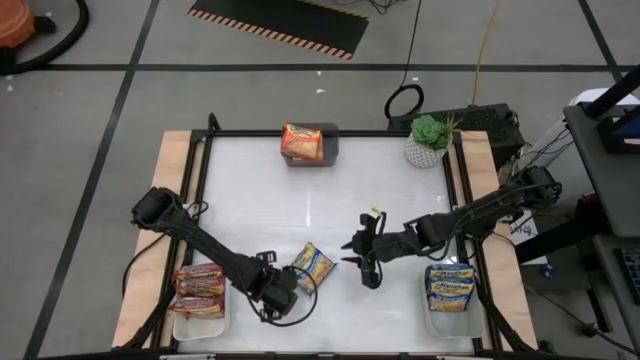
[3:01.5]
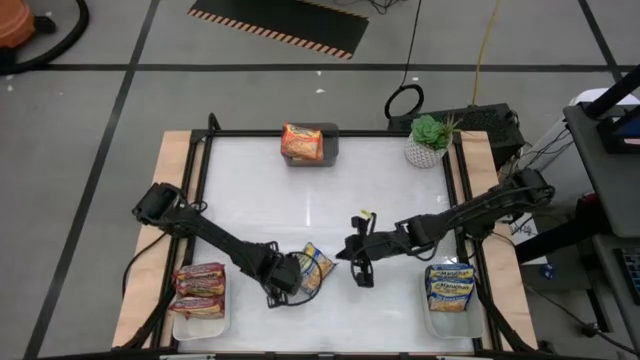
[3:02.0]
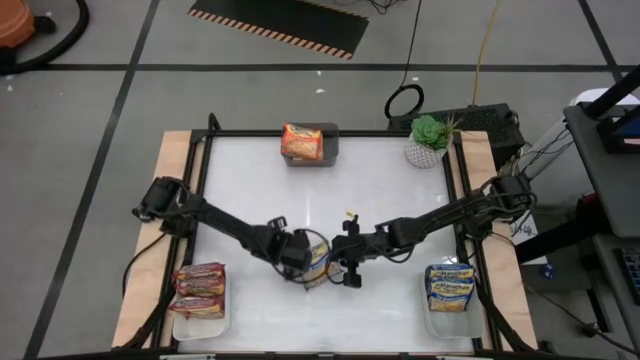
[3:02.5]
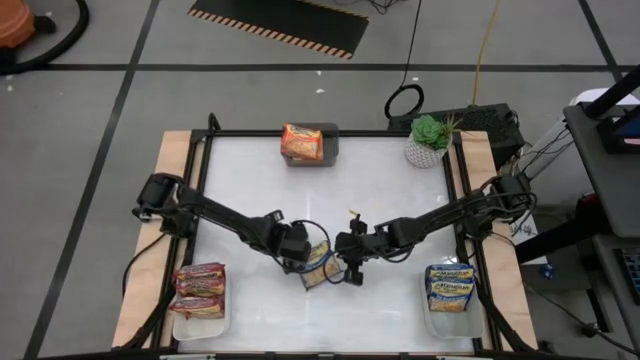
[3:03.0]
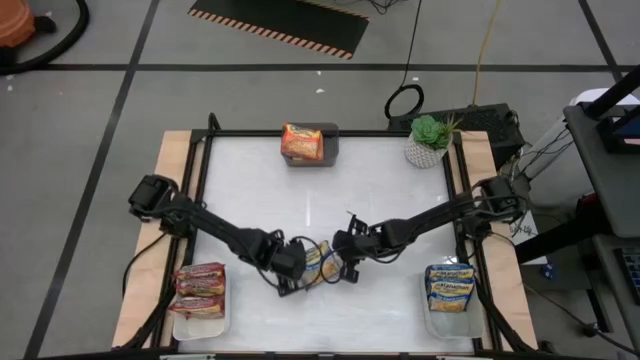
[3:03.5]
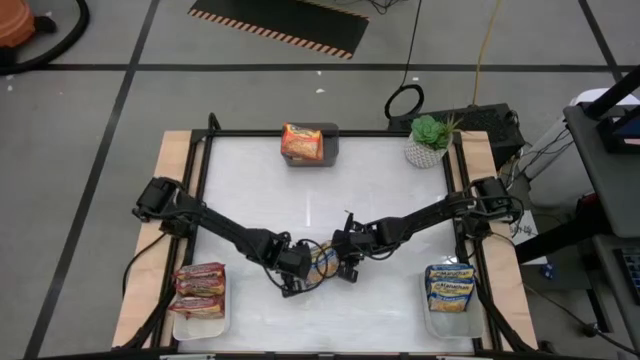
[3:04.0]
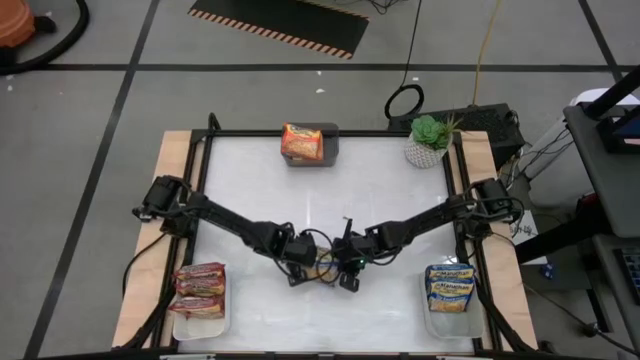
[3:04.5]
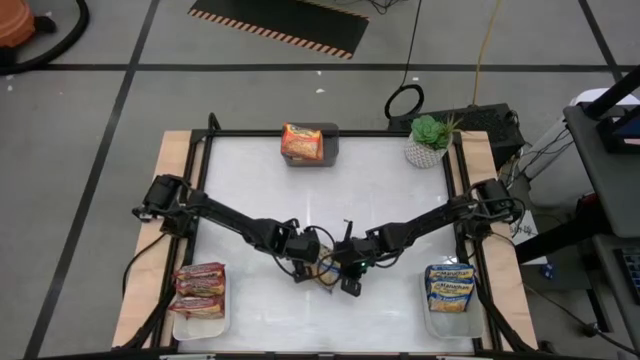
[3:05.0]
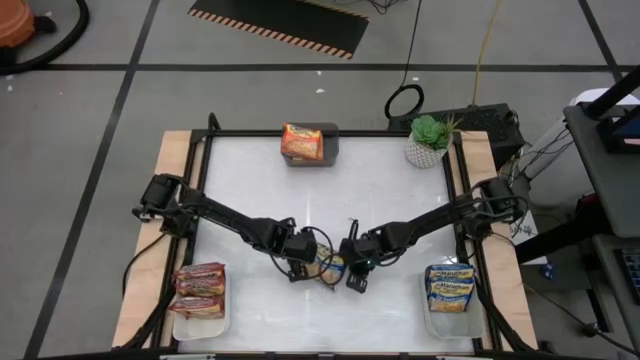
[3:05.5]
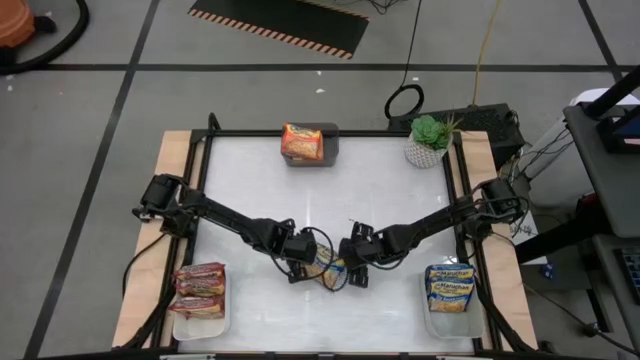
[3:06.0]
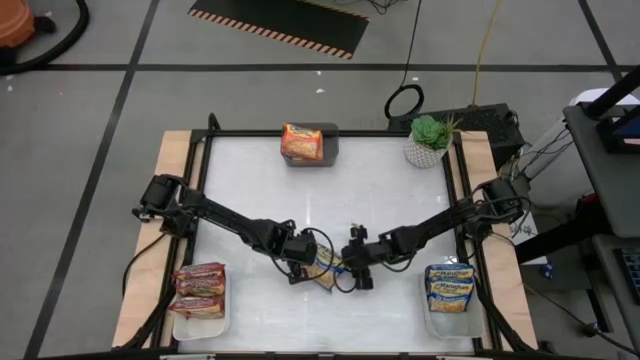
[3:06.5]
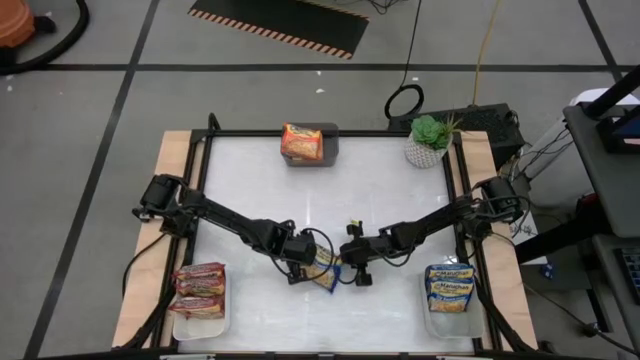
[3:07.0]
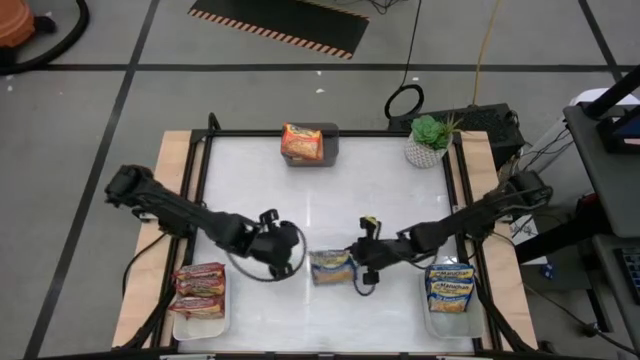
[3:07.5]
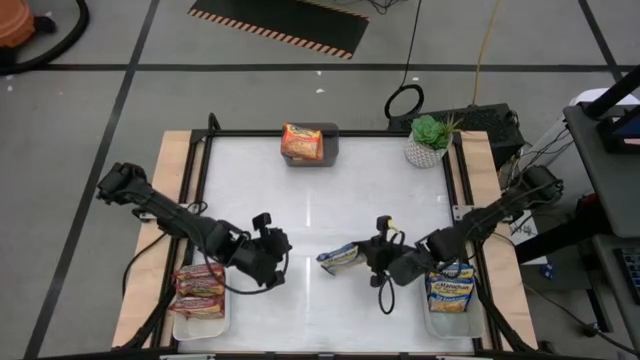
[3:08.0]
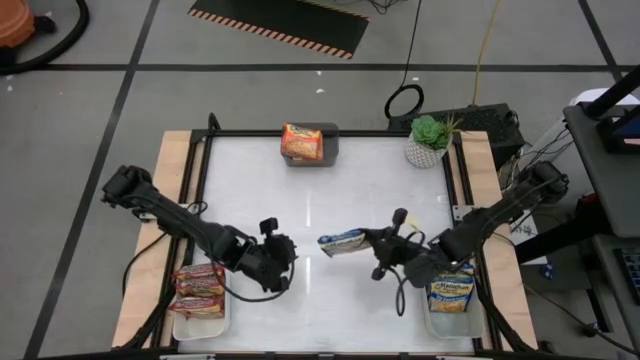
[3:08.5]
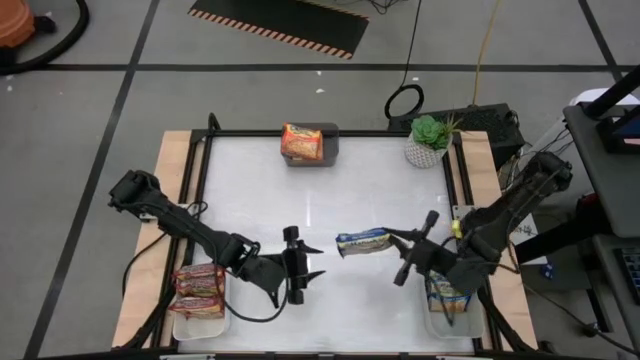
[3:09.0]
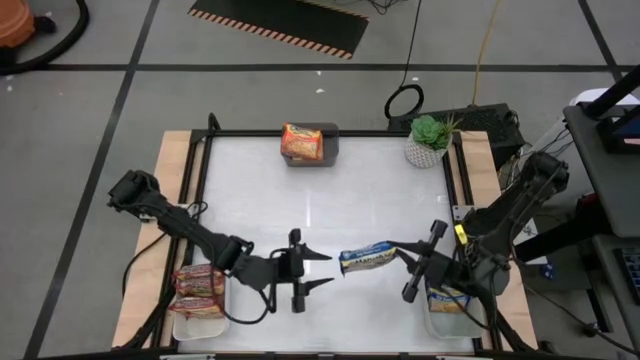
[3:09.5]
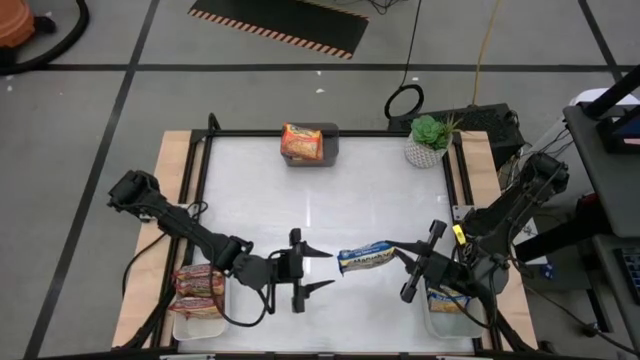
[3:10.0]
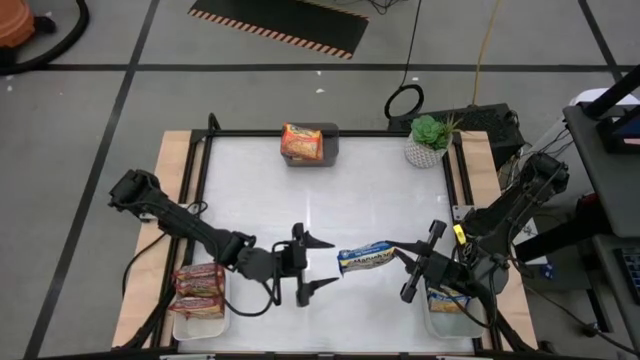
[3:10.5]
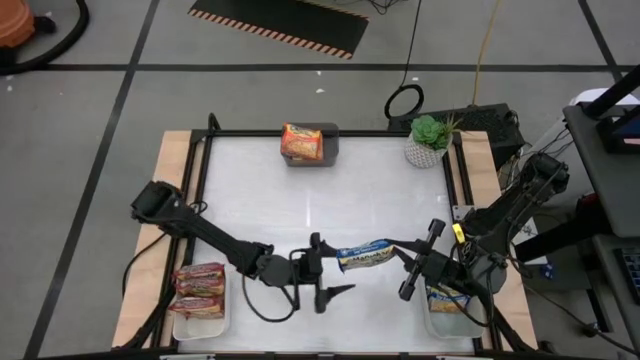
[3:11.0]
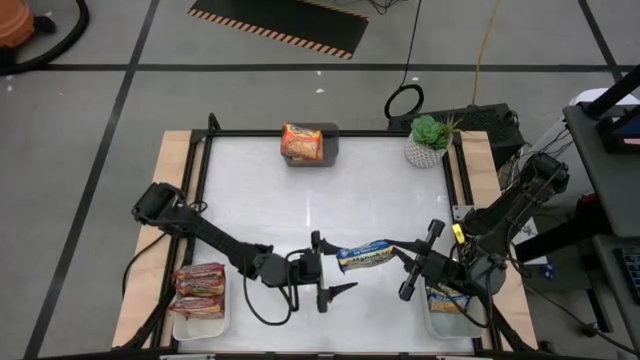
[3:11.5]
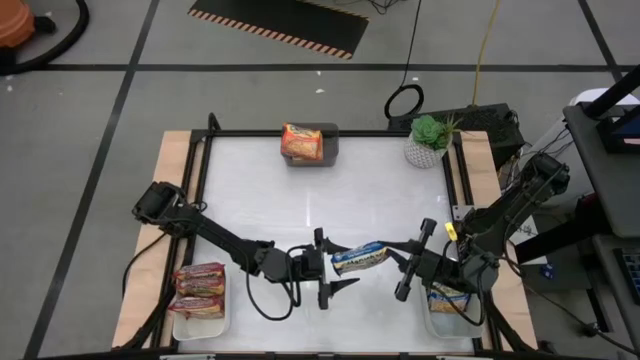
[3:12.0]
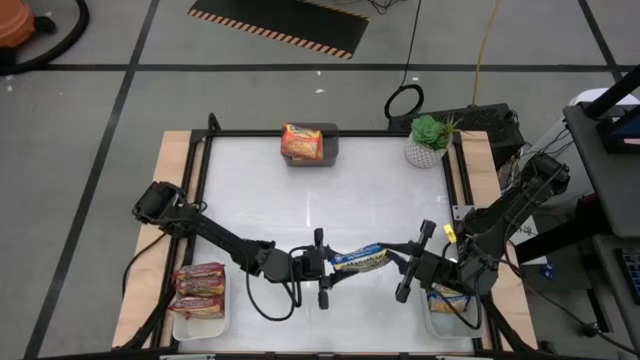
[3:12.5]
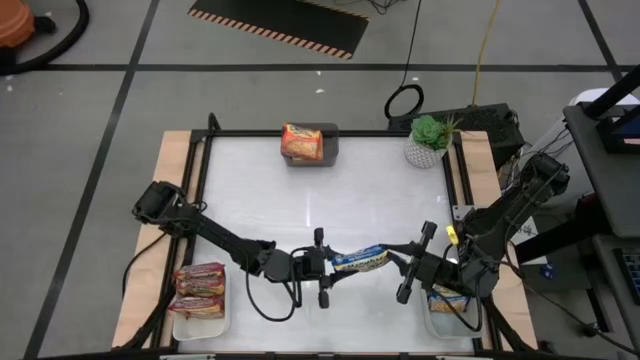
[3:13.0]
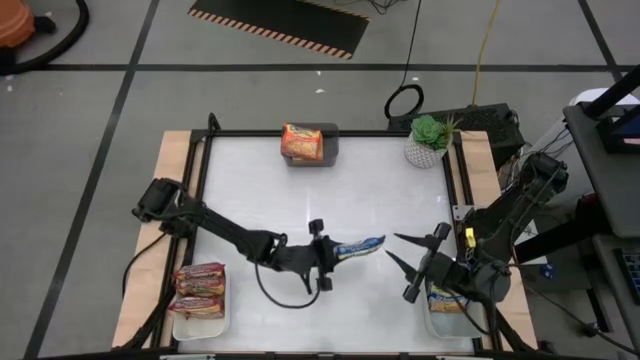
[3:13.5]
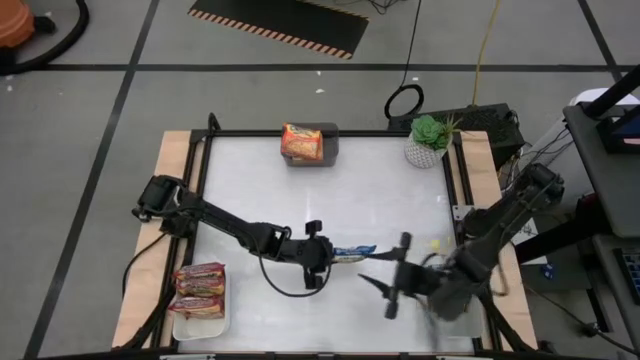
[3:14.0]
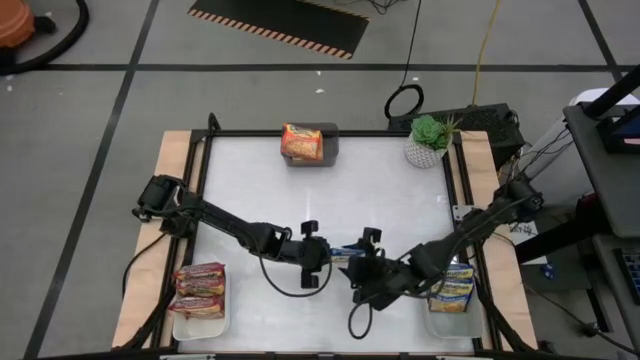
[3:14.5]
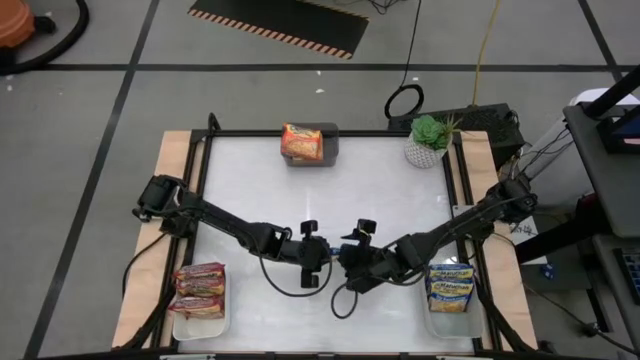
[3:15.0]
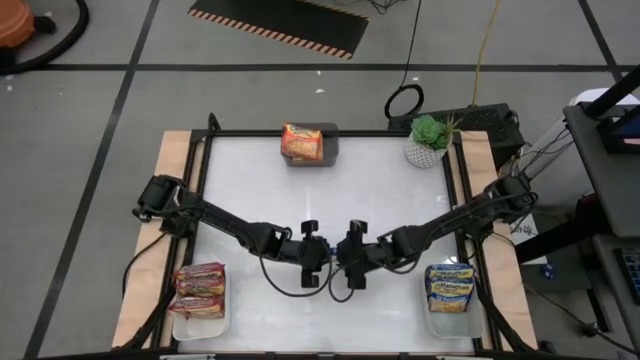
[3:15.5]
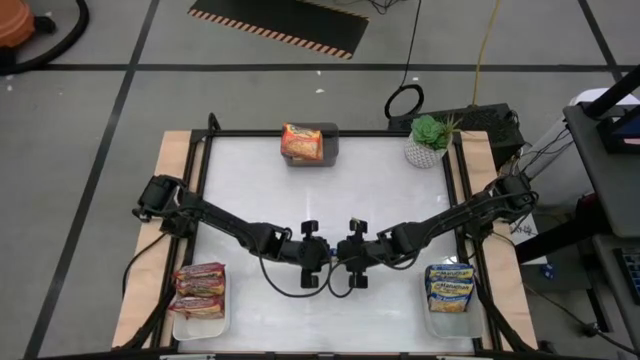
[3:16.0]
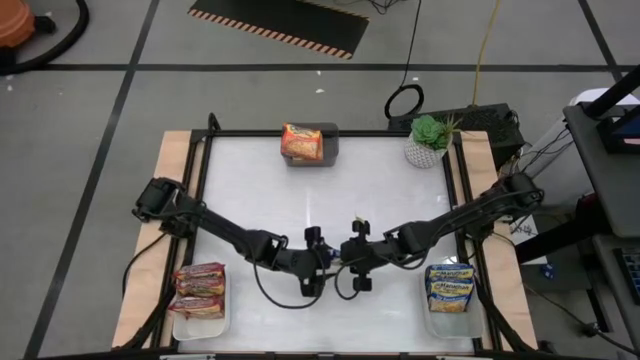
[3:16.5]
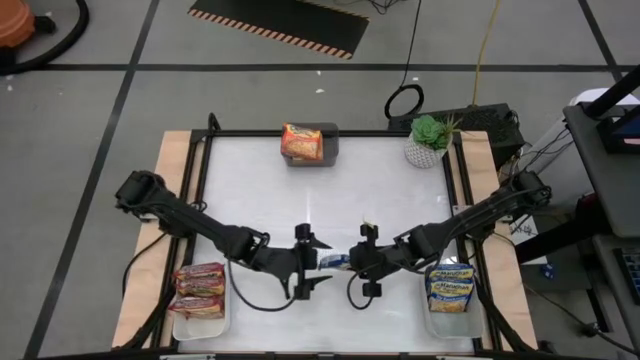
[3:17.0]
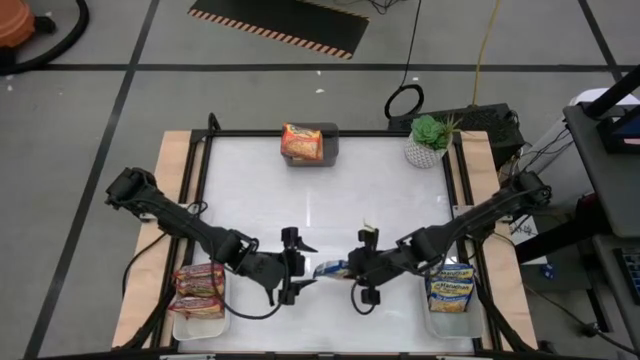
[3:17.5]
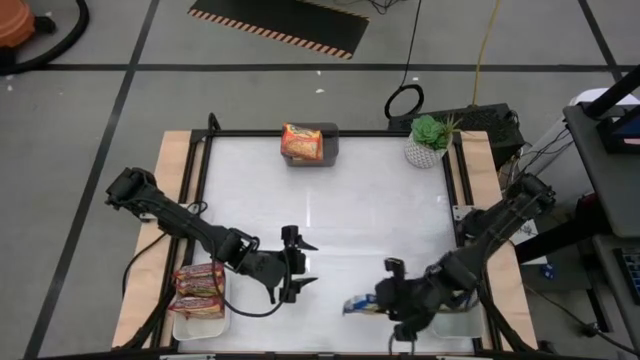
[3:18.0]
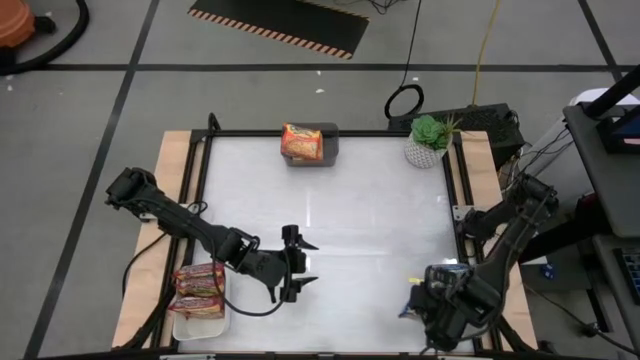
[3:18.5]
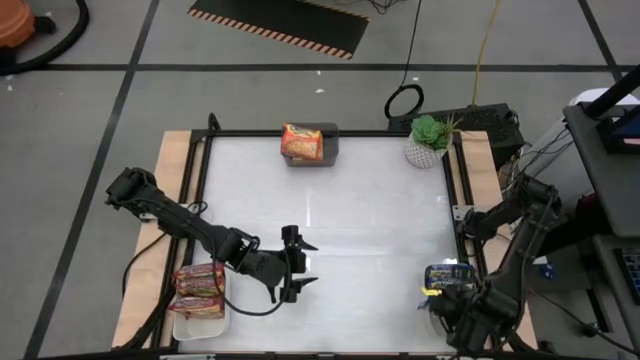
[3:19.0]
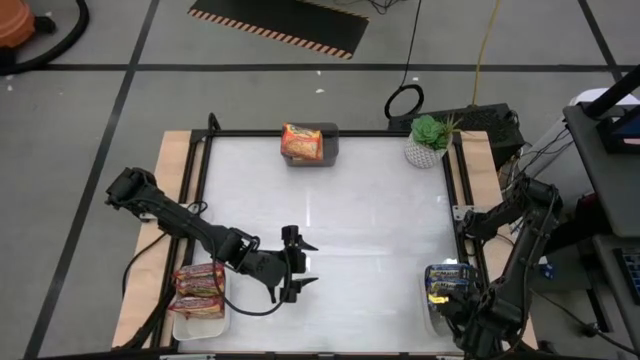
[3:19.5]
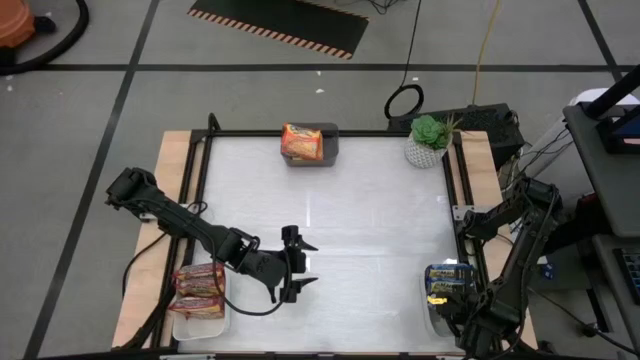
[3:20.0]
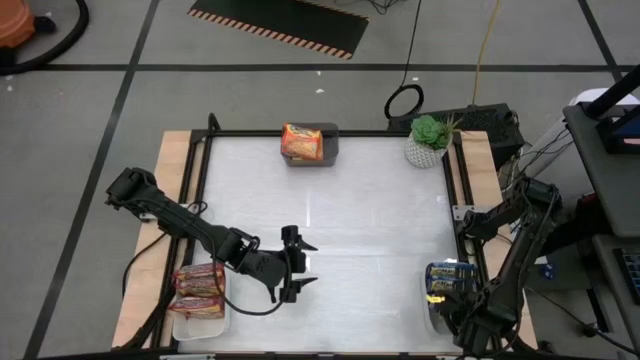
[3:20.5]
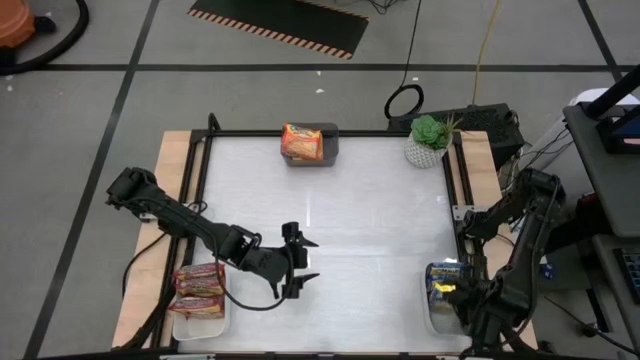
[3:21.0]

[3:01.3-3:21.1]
Task: Sort Maruchan noodles
Put the blue noodle pack into the gray bin

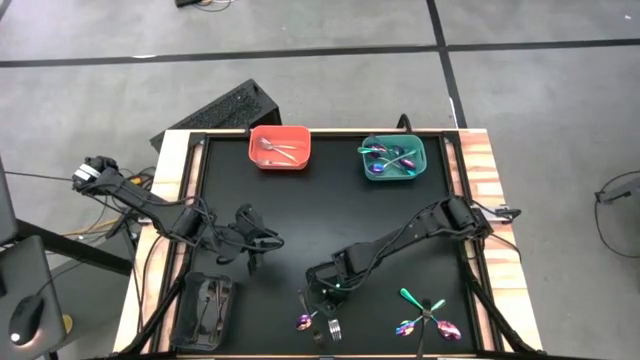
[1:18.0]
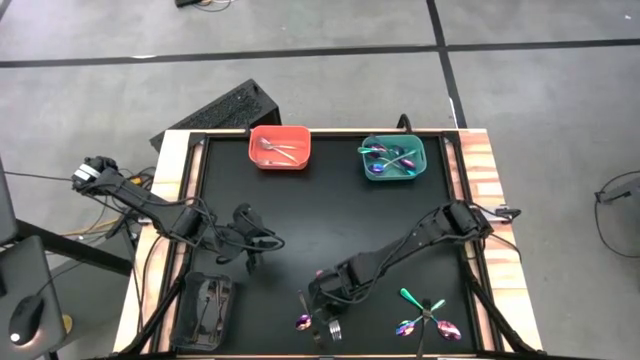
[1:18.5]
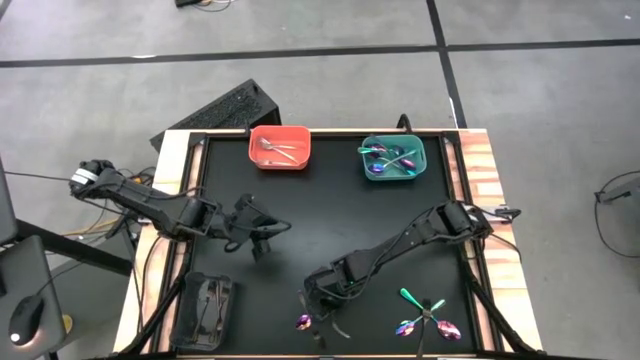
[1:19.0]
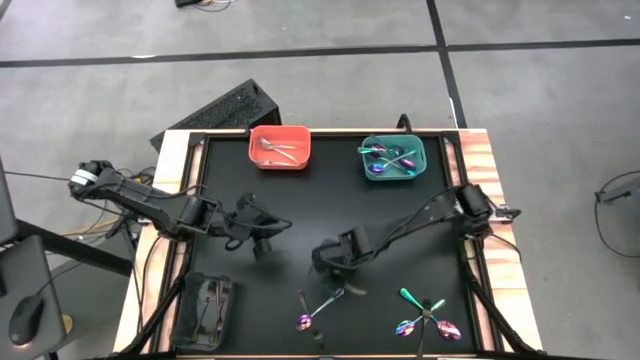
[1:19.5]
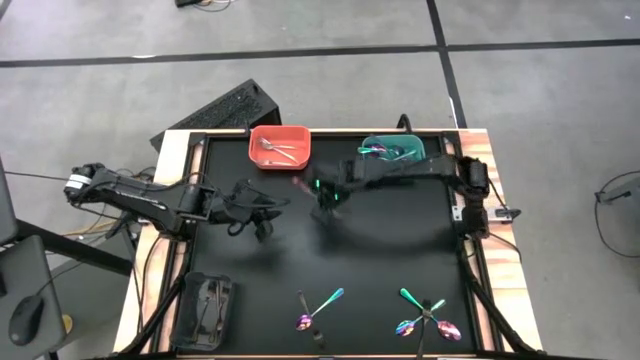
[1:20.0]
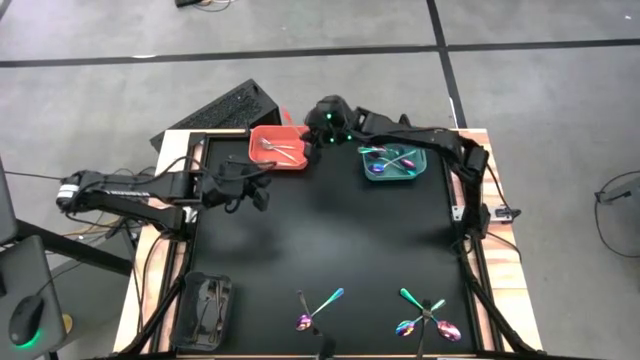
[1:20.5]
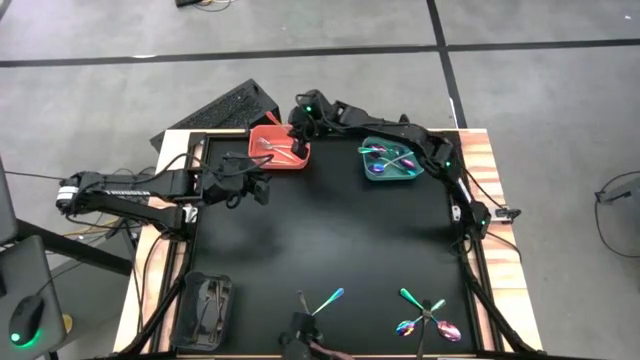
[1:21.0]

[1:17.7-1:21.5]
Task: Sort silverware by color (type)
Put the orange fork into the orange bin
